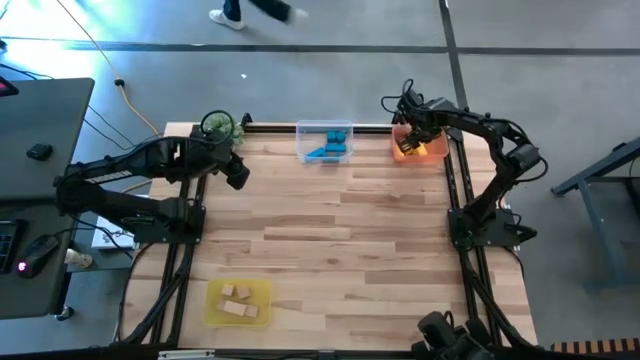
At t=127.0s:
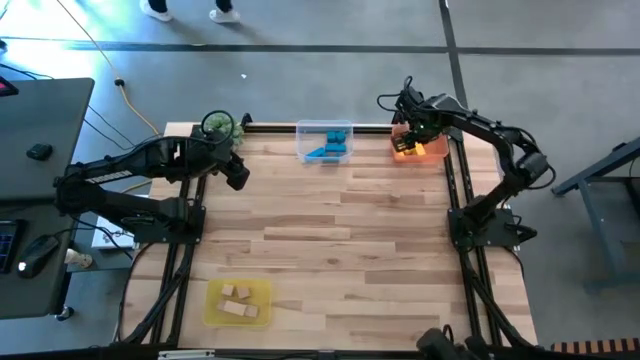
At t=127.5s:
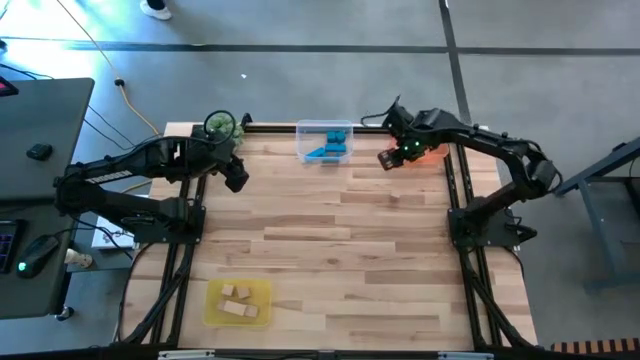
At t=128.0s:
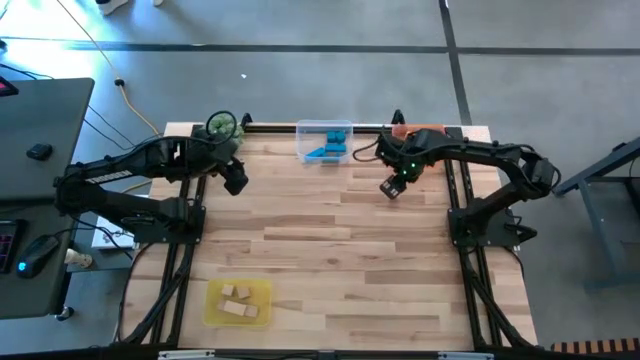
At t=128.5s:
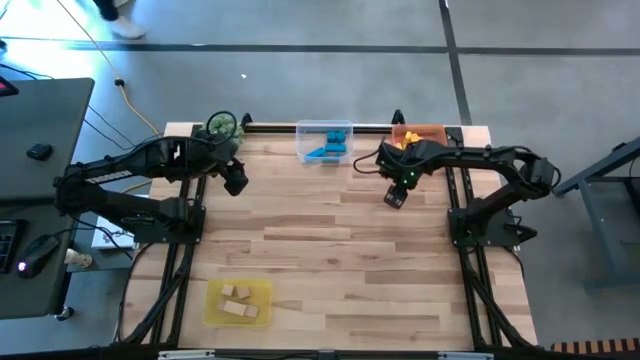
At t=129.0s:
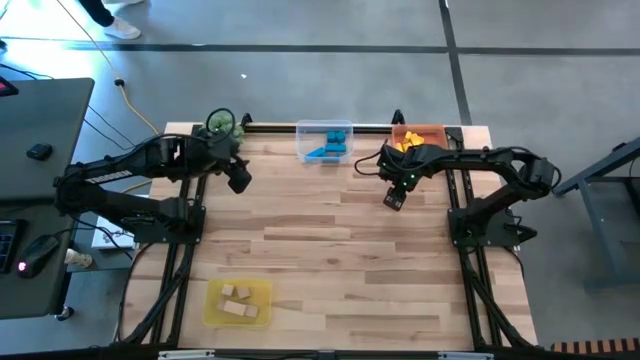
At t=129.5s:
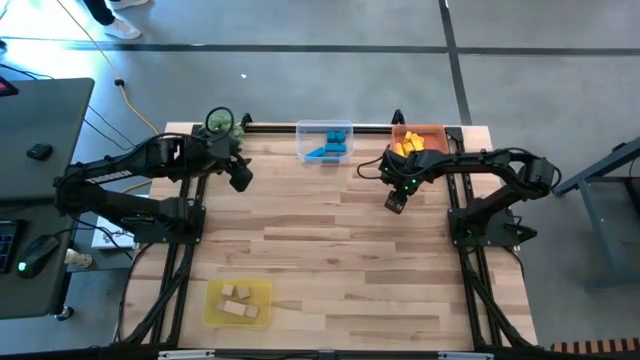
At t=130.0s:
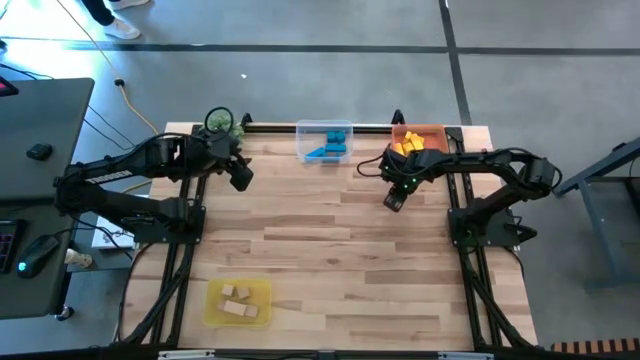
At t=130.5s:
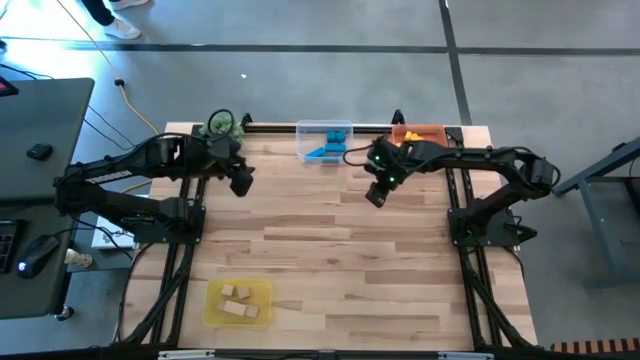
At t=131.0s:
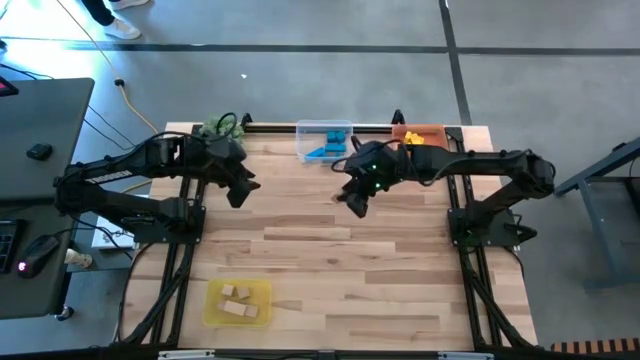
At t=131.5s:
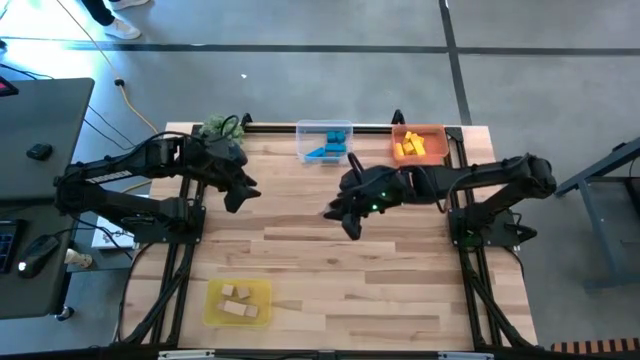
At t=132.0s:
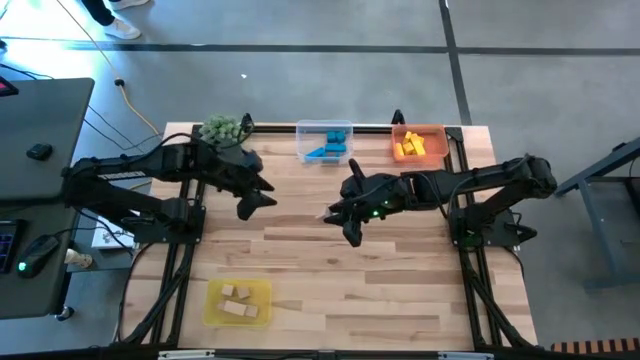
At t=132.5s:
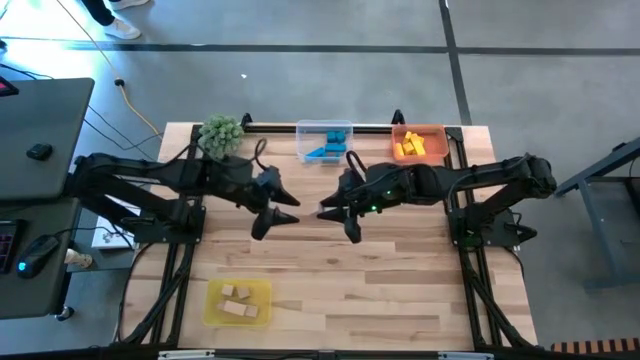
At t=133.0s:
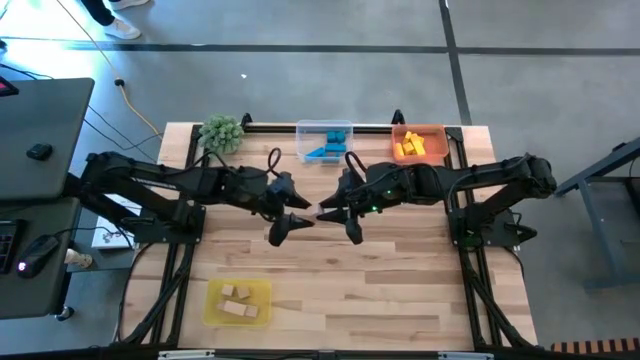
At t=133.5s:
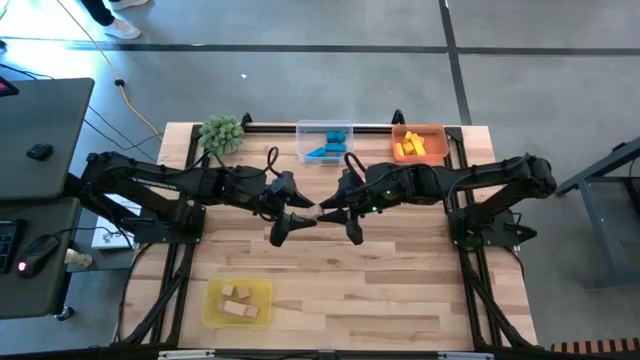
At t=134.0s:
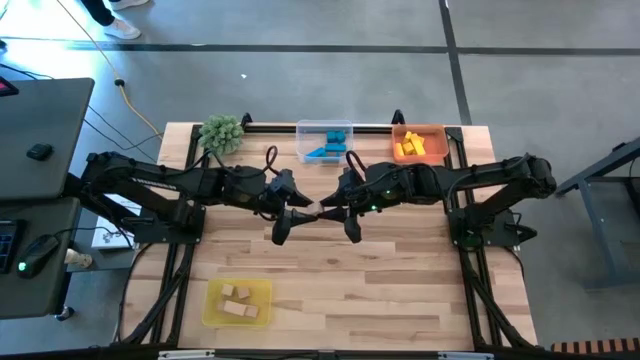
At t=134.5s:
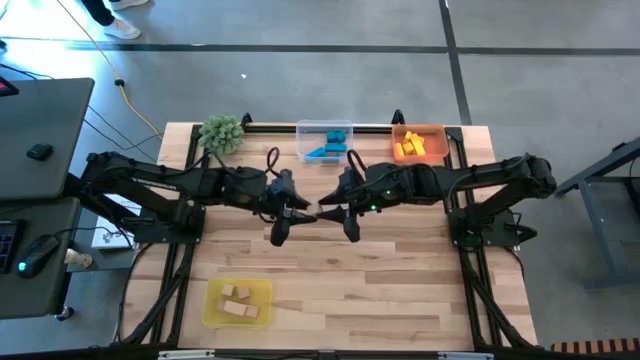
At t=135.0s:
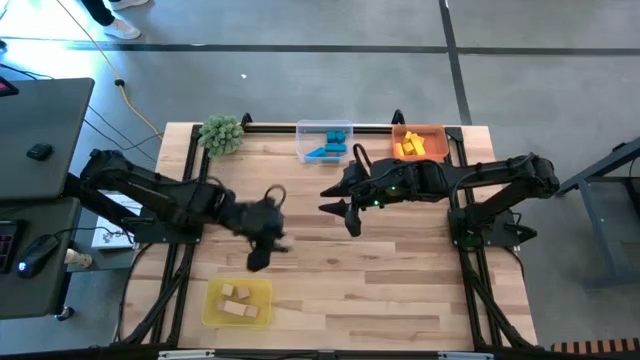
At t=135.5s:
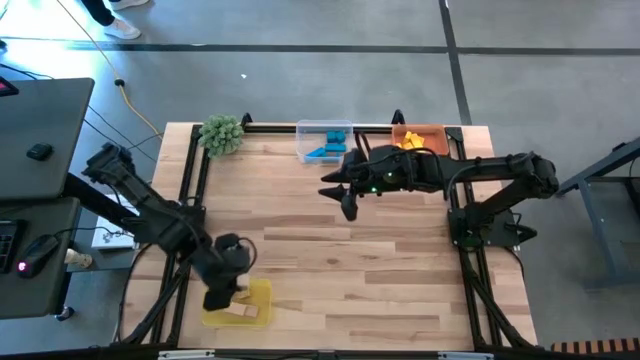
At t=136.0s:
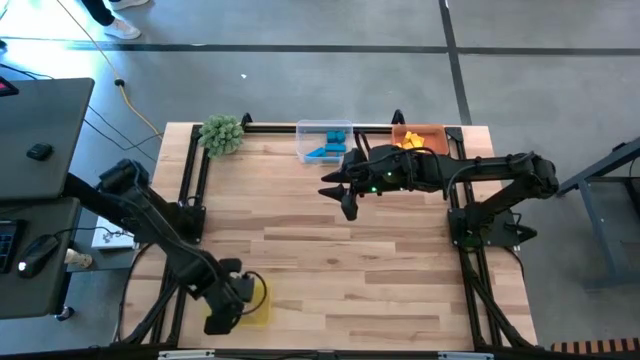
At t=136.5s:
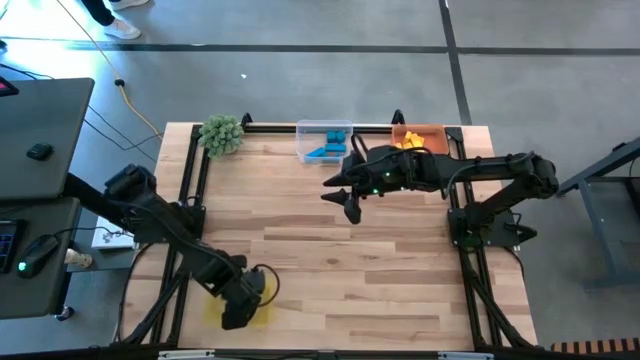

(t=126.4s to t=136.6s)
Task: Sort & place blocks by color
Put the brown block into the yellow bin

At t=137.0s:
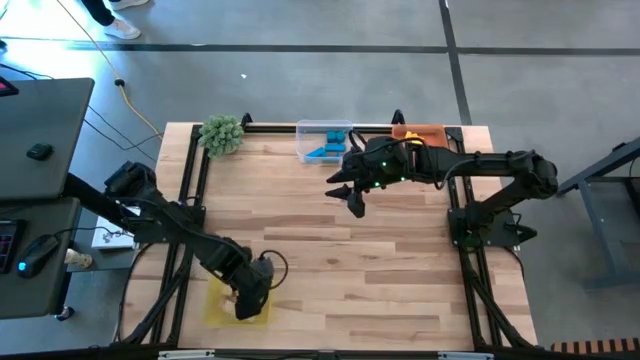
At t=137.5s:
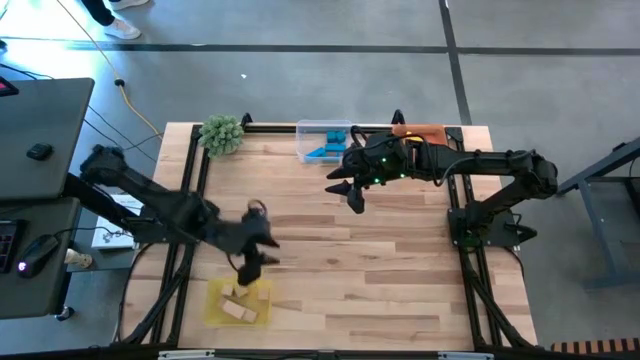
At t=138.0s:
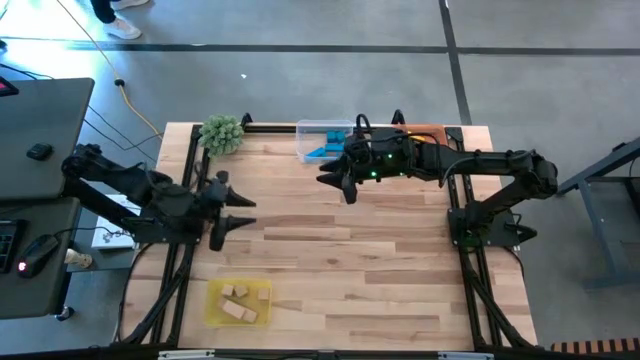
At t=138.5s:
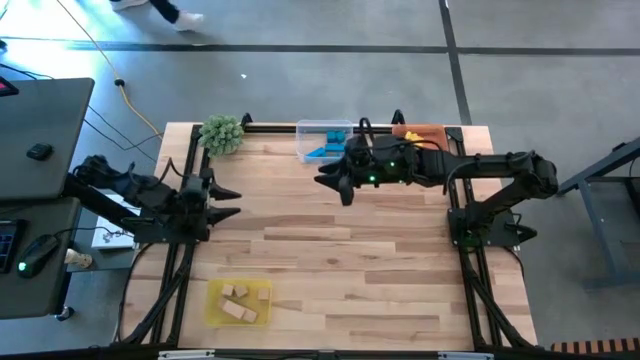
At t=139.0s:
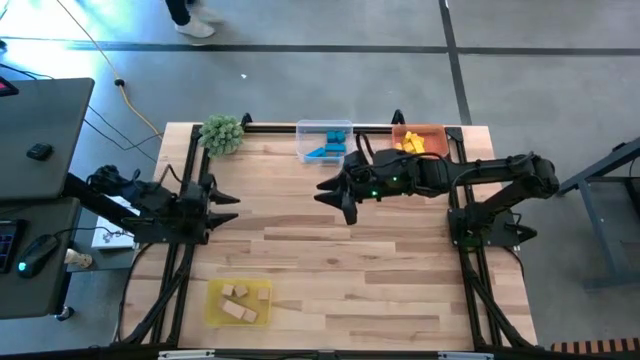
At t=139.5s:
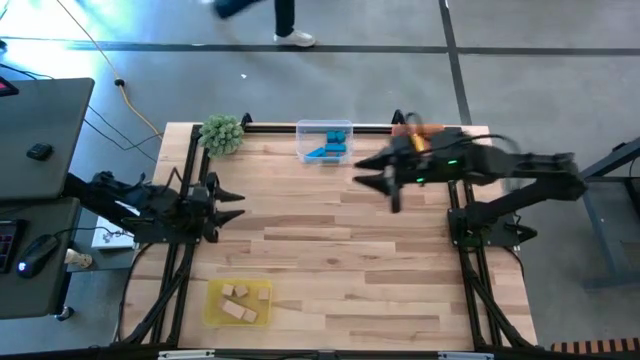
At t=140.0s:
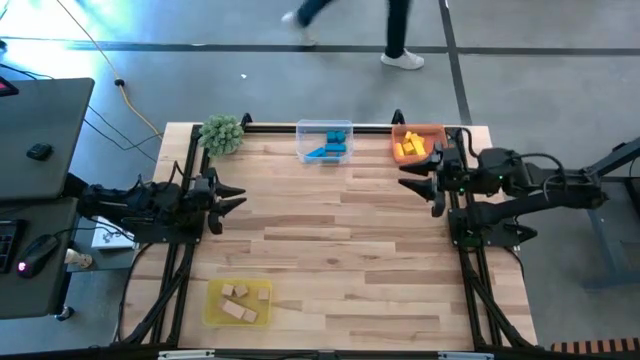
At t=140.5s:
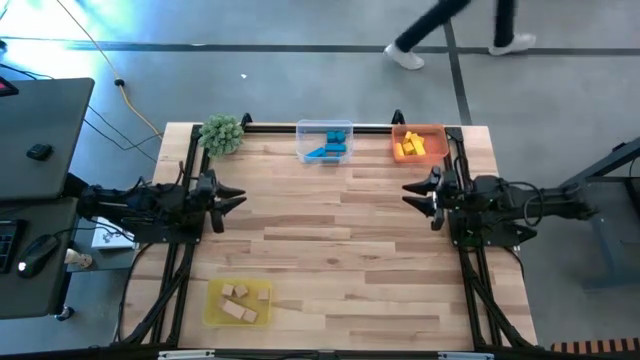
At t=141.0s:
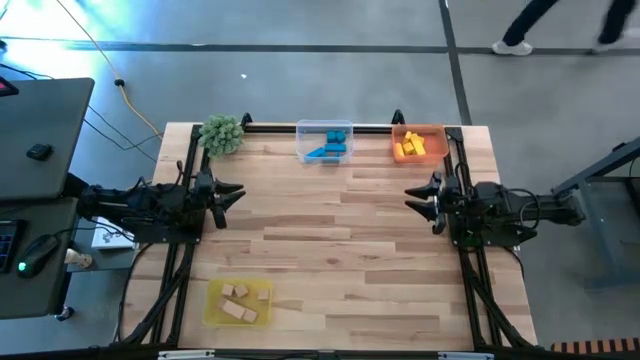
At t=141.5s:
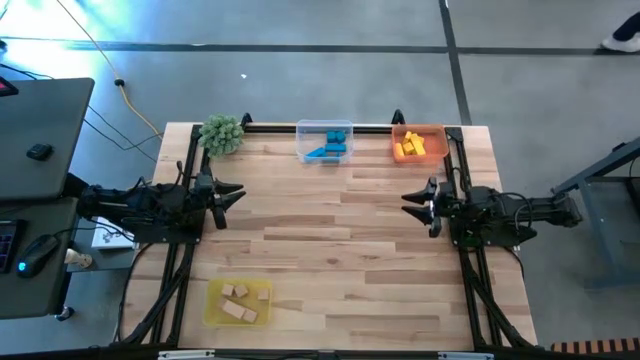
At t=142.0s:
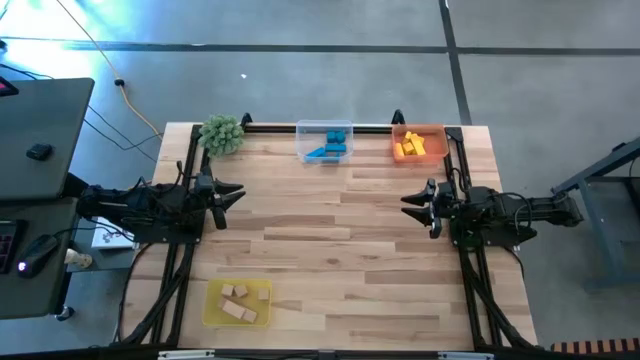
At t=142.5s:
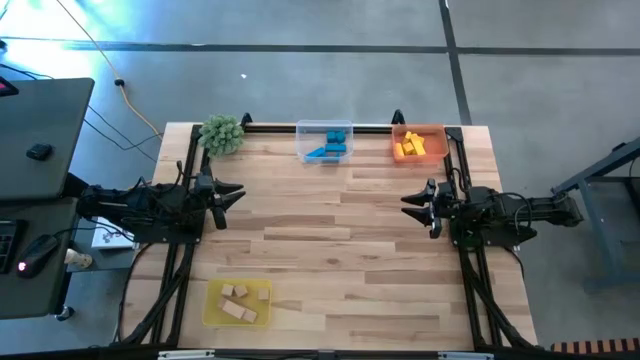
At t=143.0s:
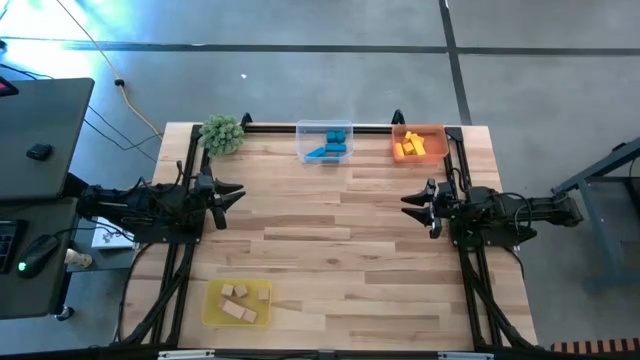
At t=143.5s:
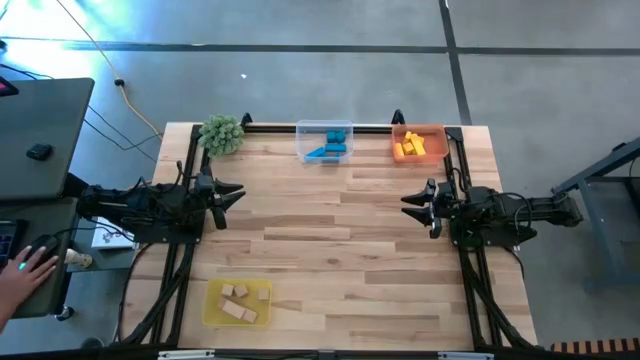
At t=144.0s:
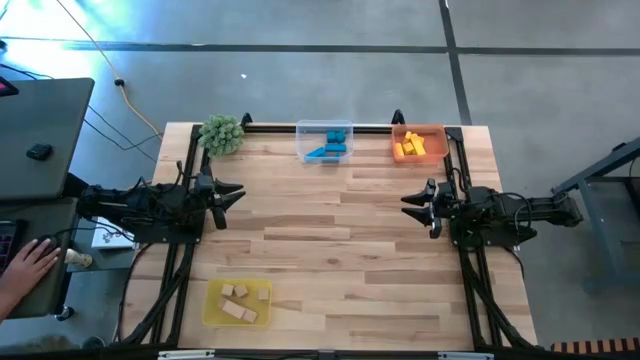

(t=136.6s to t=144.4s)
Return to Home Position

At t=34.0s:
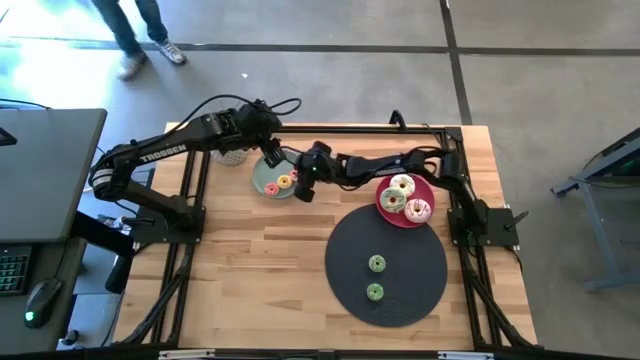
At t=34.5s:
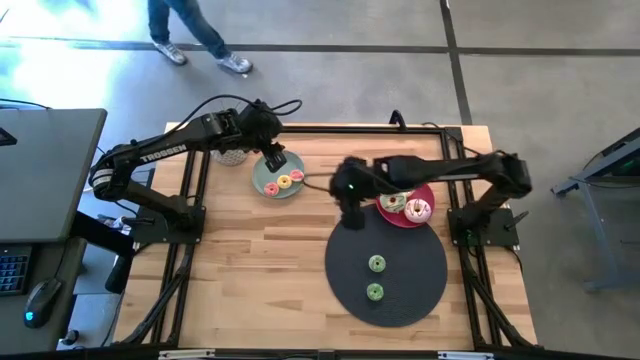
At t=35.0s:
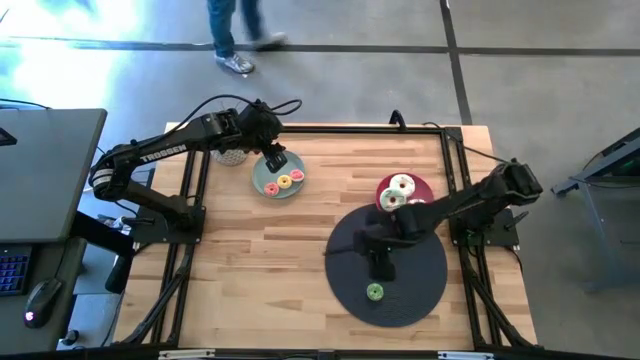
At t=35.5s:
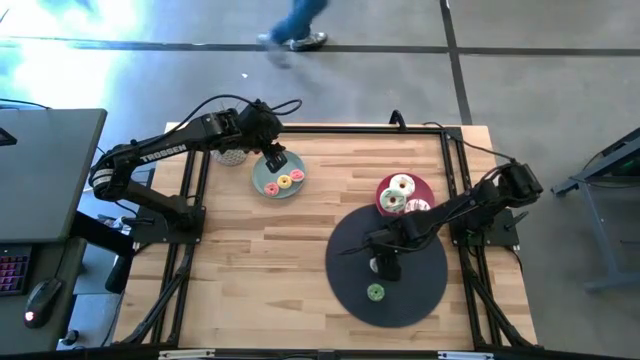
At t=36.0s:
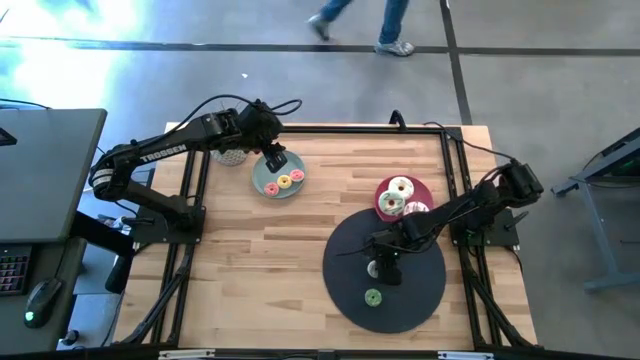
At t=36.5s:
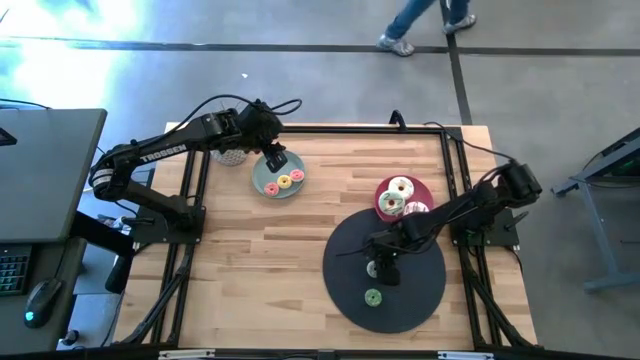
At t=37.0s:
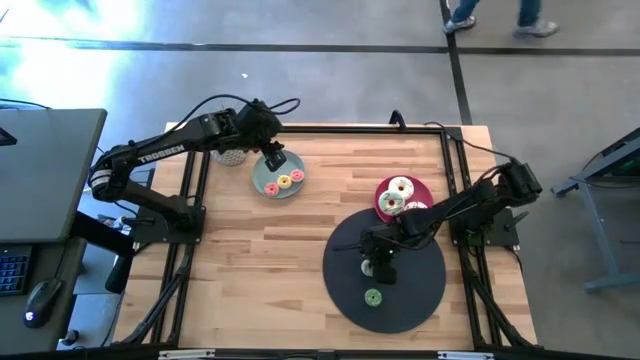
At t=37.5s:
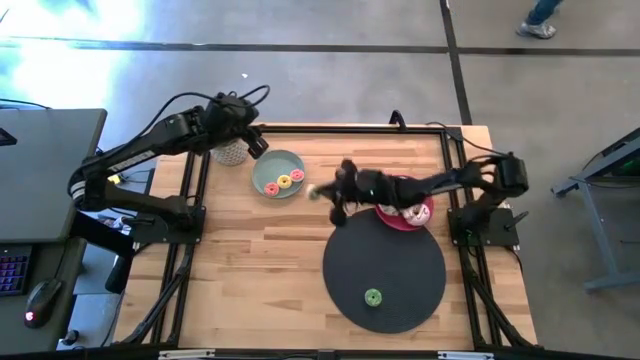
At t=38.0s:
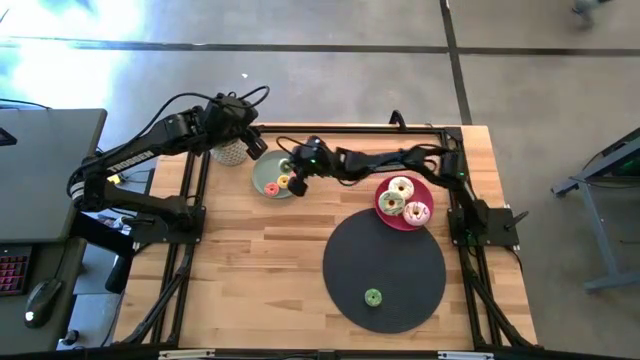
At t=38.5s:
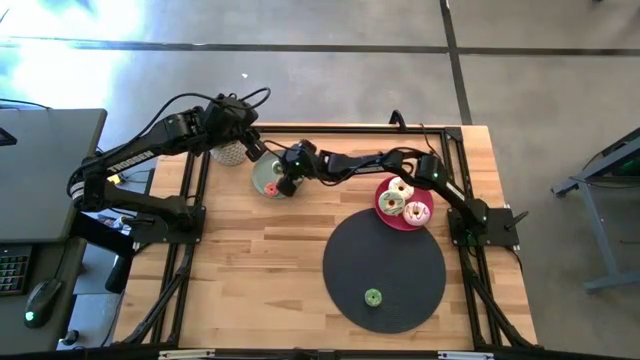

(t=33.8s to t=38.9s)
Task: Pick & Place donuts
Put the top small green donut on the gray plate
